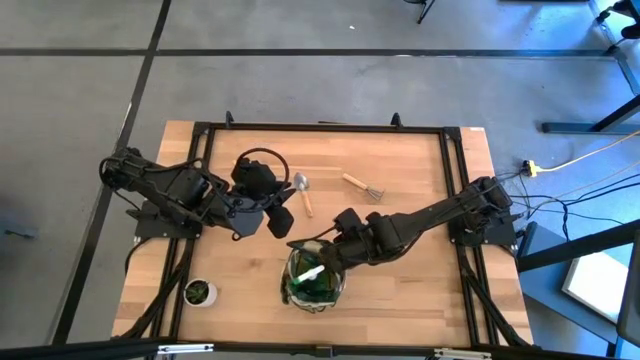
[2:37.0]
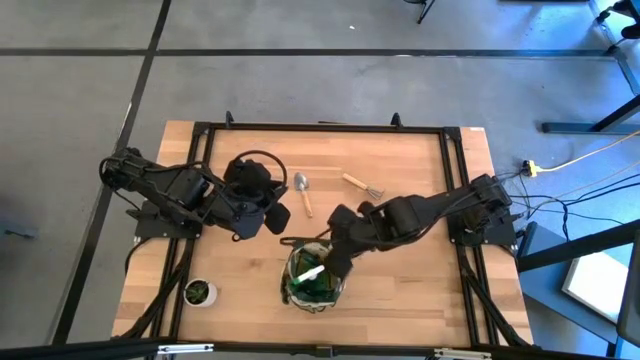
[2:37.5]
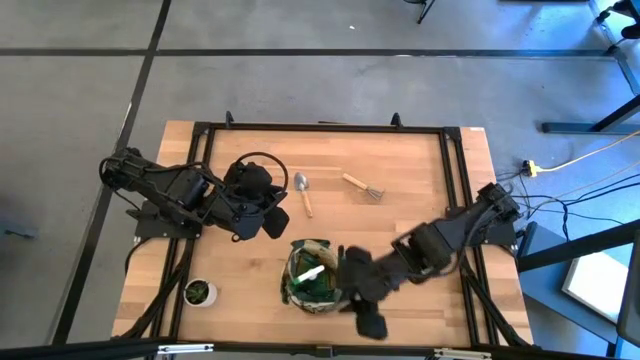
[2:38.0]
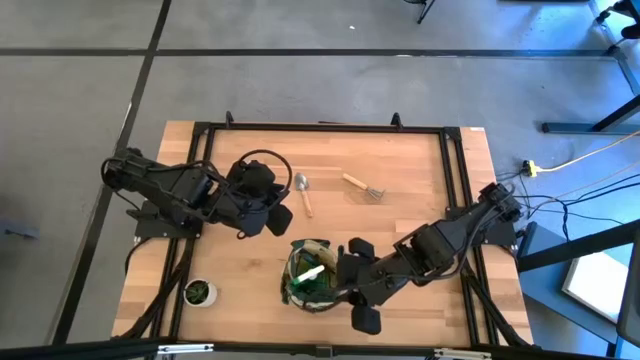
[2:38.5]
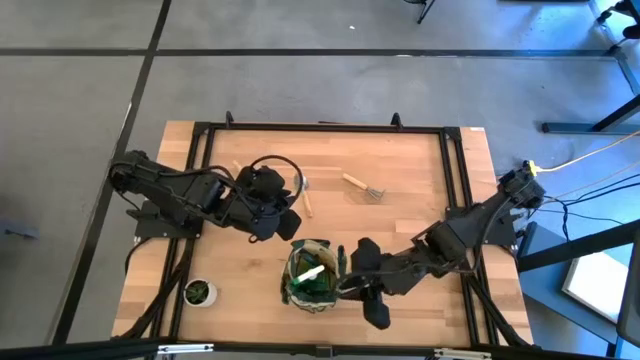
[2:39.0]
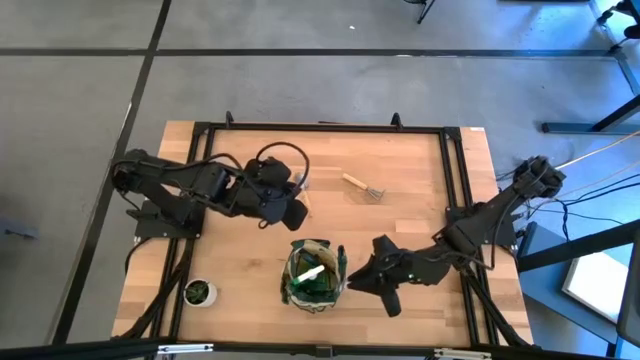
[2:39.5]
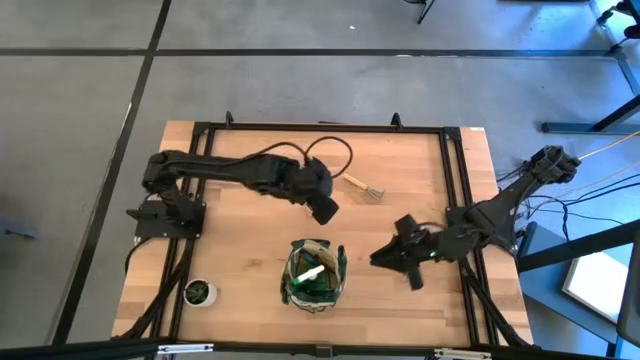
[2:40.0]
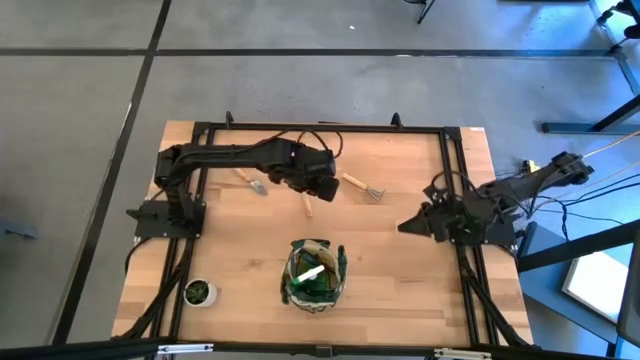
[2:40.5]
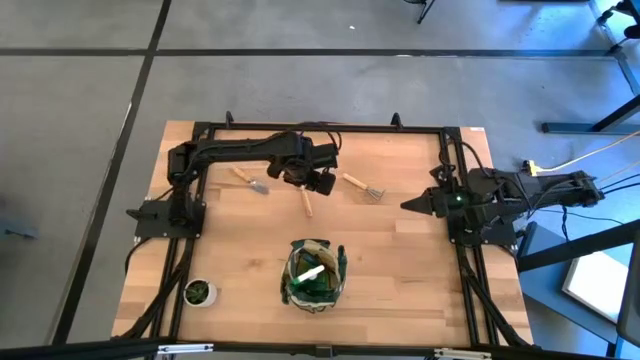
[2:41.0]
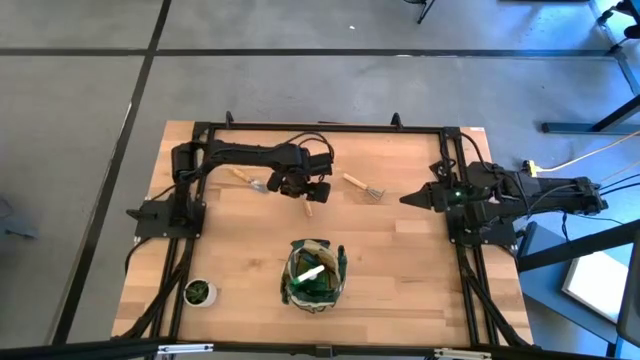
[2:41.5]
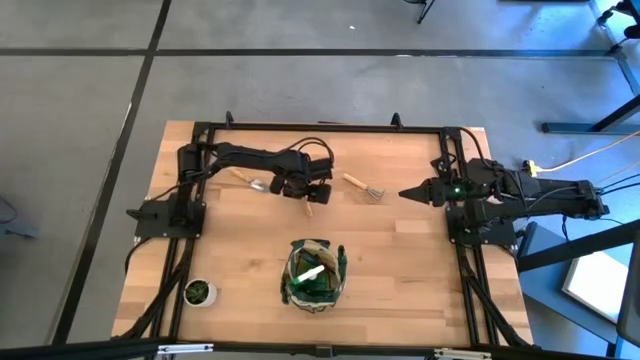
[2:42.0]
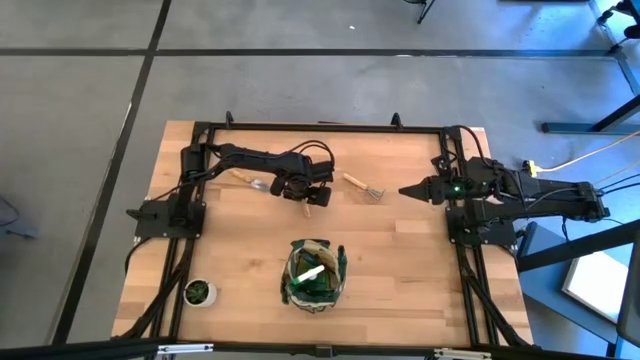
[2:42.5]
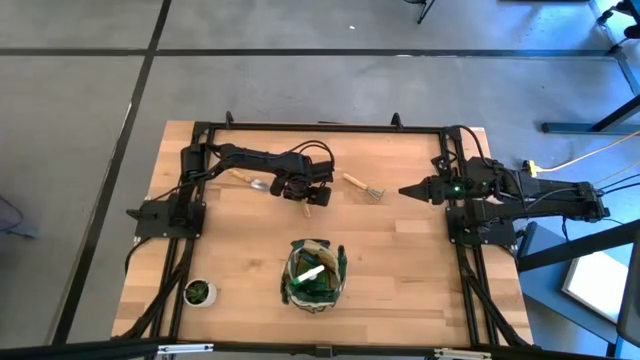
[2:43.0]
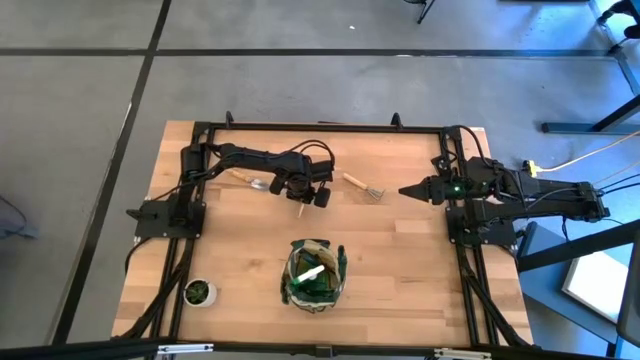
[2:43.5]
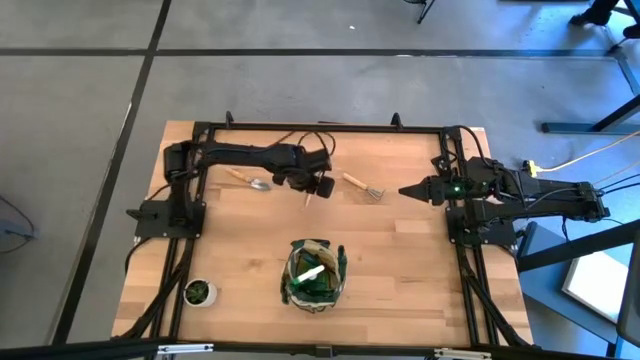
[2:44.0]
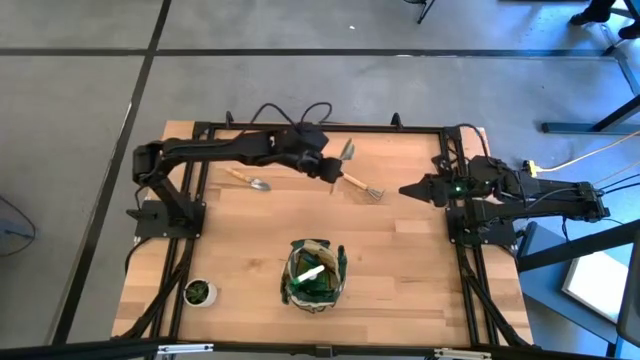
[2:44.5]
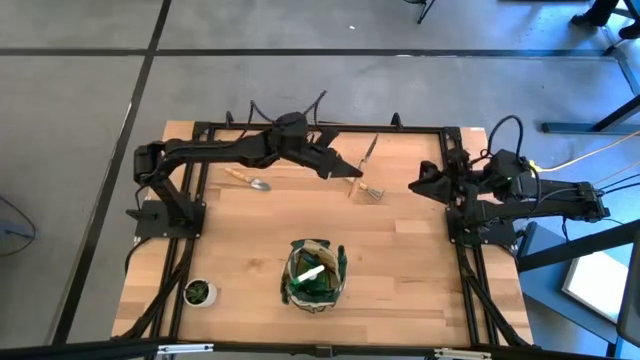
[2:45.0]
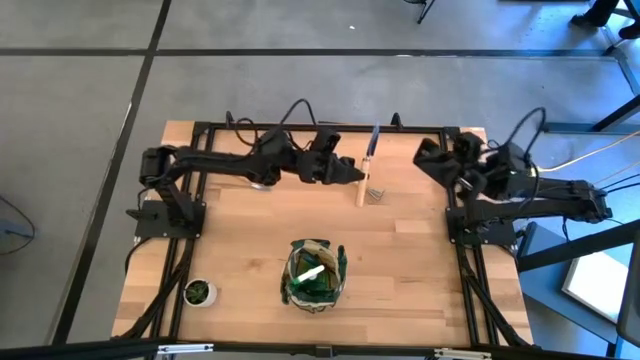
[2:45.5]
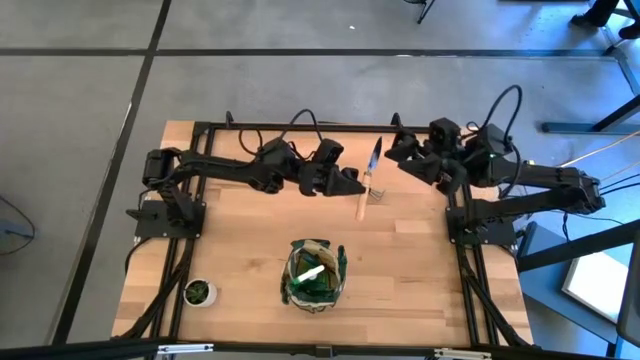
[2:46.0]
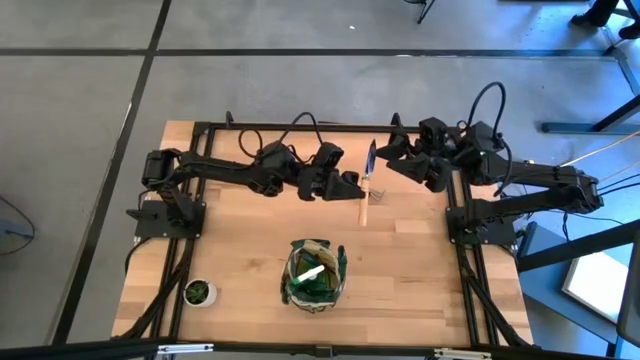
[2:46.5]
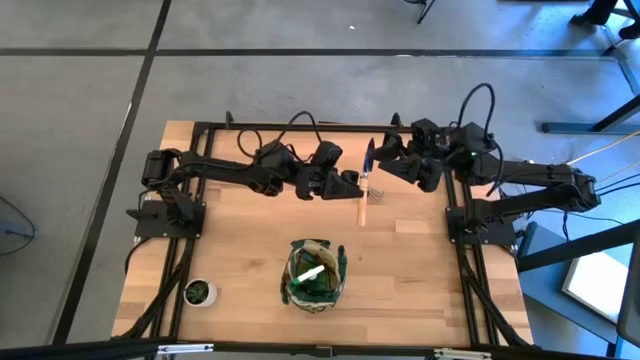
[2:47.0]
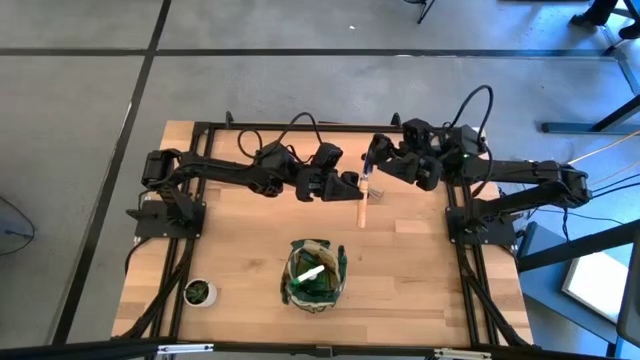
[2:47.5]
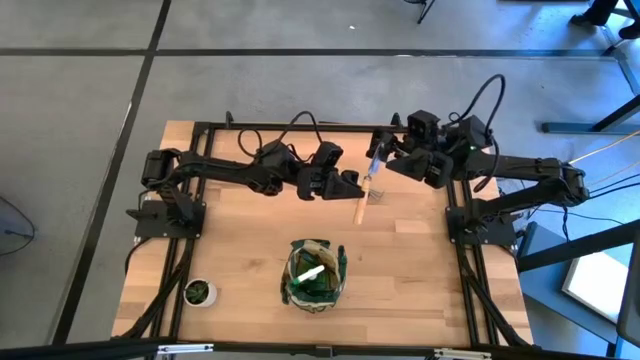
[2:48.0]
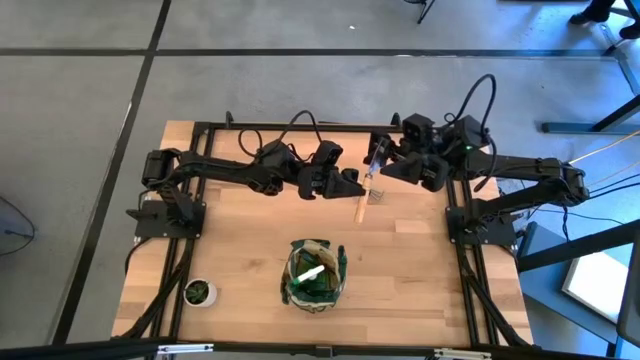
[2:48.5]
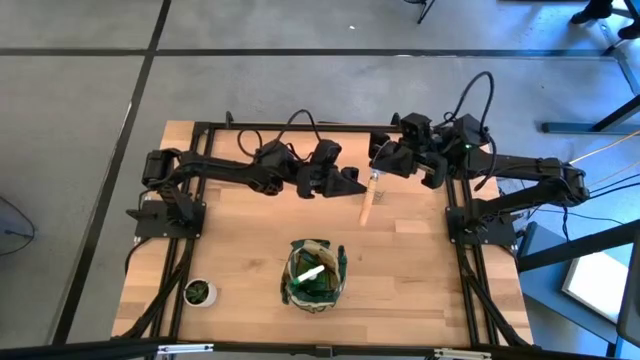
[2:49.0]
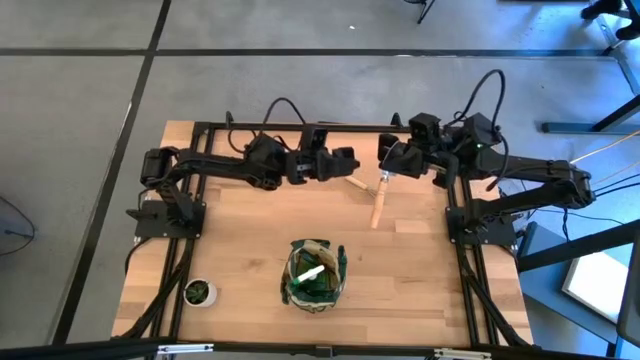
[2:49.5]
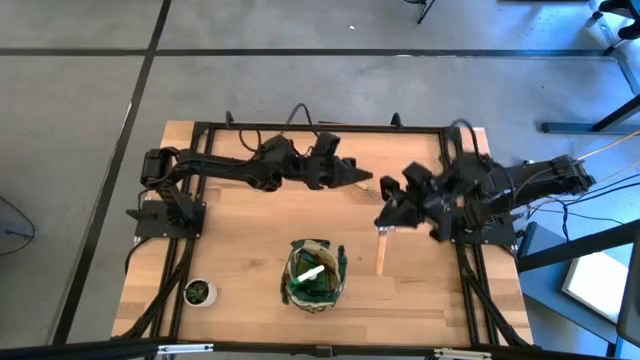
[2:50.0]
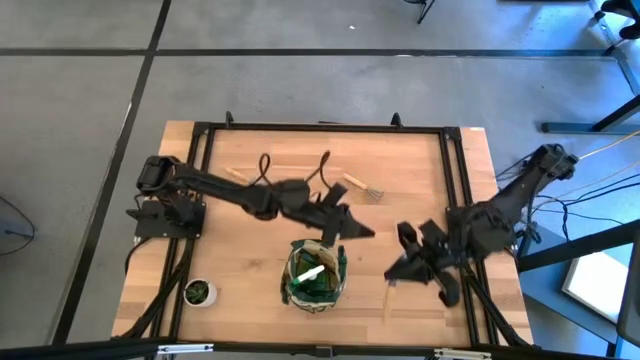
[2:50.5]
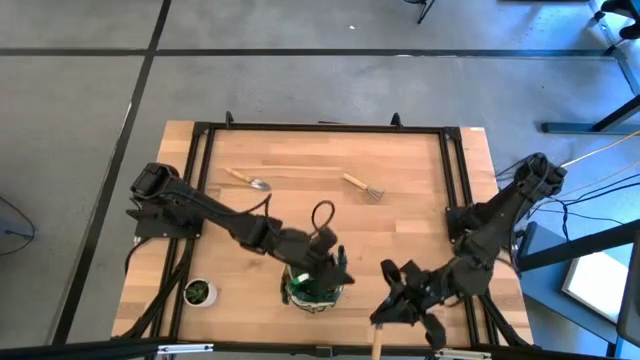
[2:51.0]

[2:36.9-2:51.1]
Task: Pick & Place Garden tools in Gardening bag
Put the right brown trowel into the gardening bag
